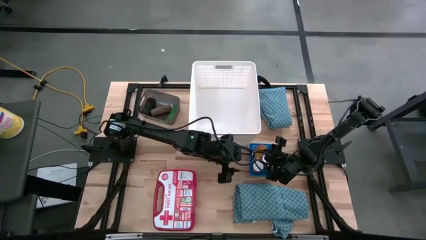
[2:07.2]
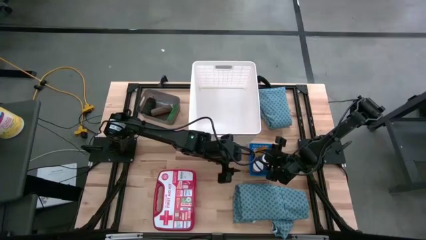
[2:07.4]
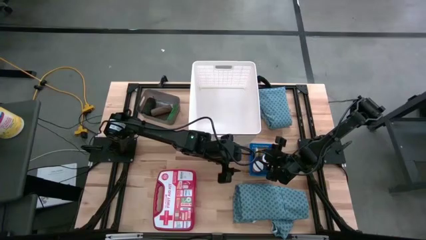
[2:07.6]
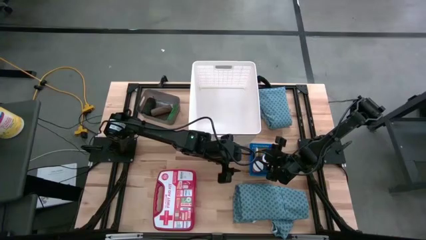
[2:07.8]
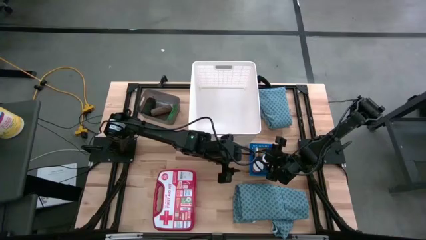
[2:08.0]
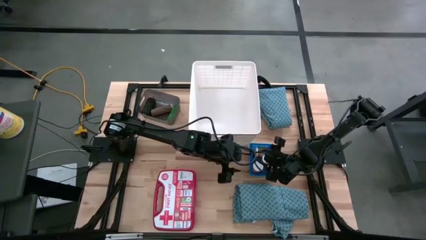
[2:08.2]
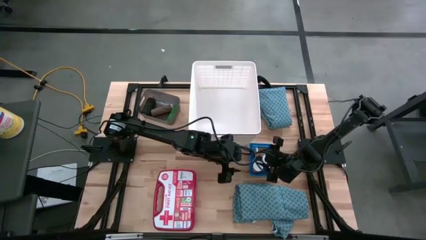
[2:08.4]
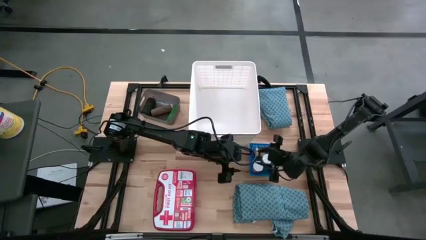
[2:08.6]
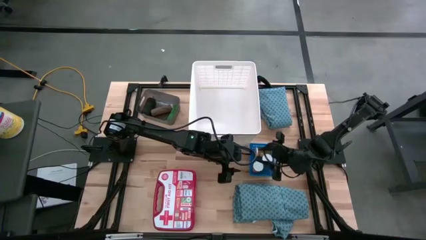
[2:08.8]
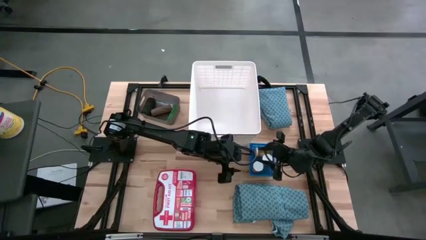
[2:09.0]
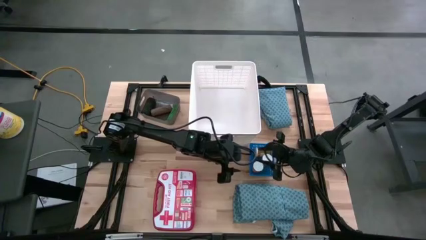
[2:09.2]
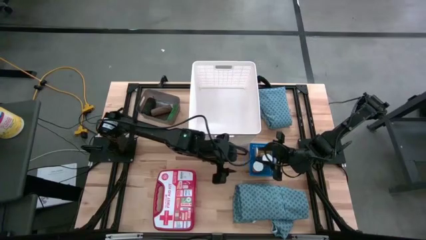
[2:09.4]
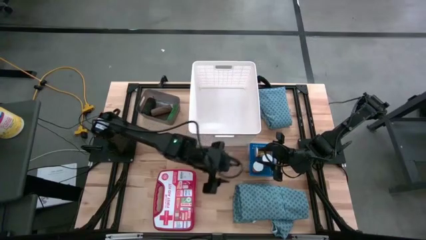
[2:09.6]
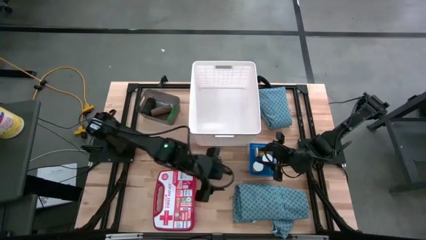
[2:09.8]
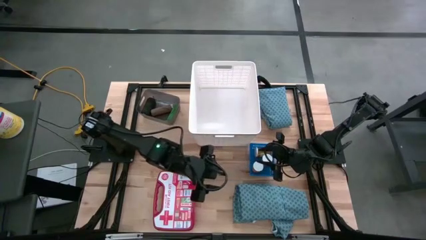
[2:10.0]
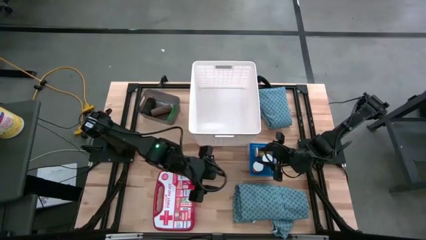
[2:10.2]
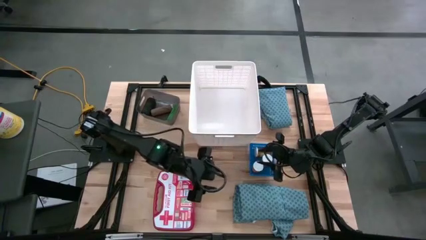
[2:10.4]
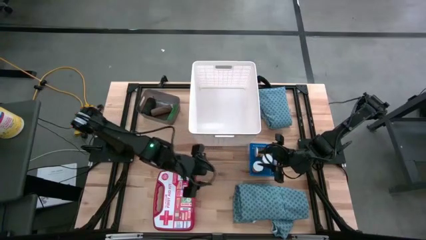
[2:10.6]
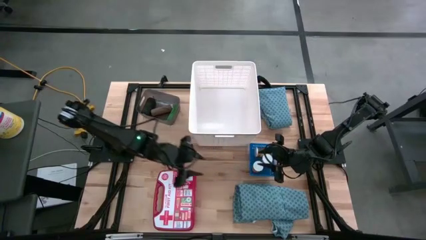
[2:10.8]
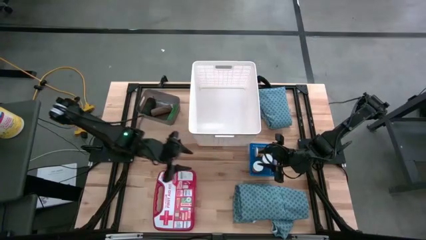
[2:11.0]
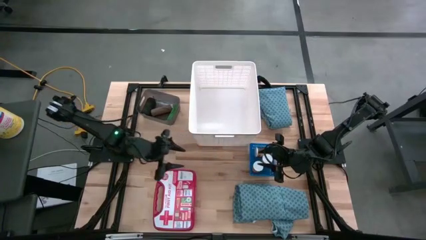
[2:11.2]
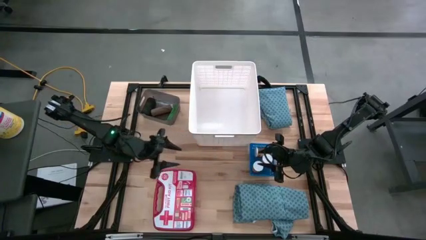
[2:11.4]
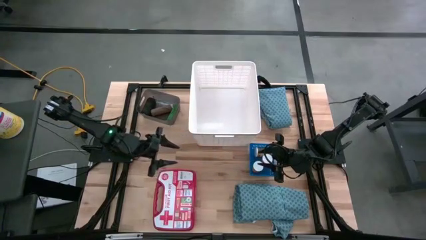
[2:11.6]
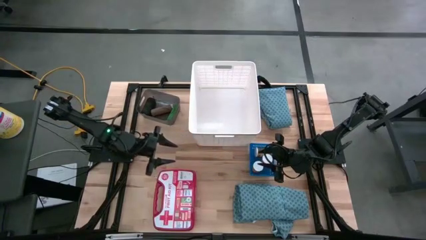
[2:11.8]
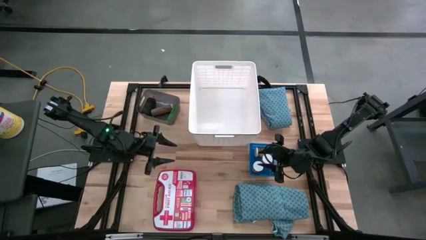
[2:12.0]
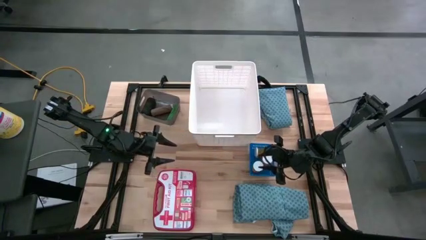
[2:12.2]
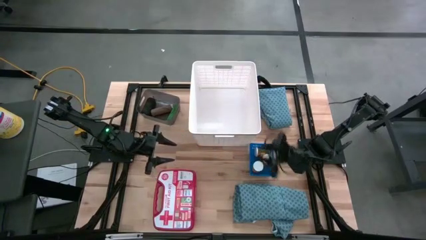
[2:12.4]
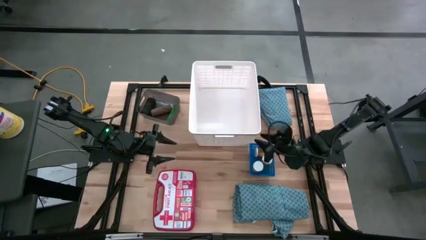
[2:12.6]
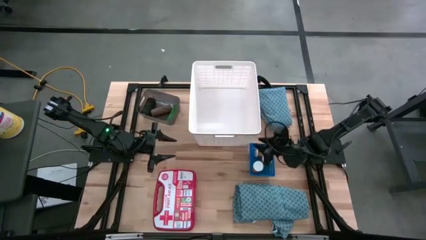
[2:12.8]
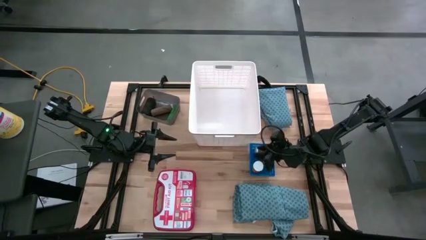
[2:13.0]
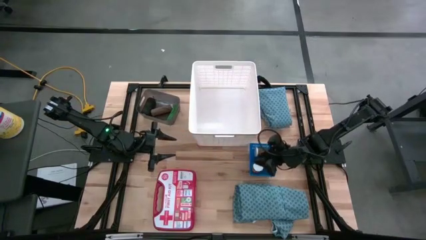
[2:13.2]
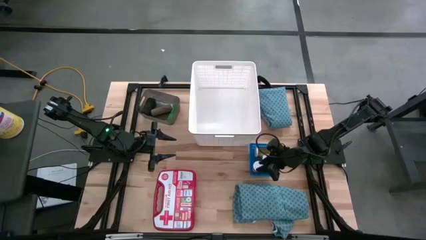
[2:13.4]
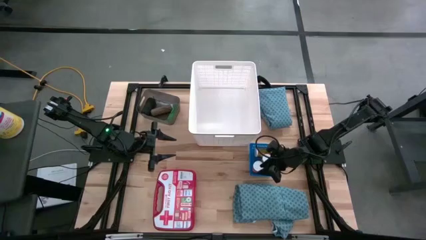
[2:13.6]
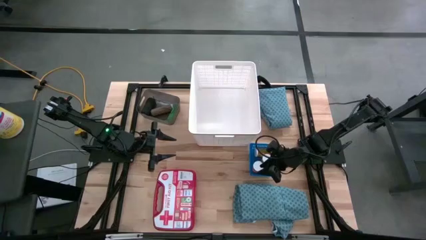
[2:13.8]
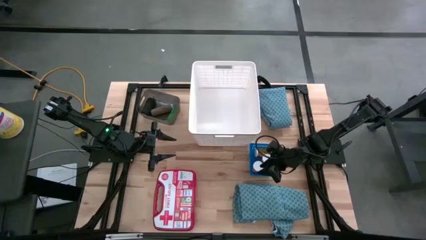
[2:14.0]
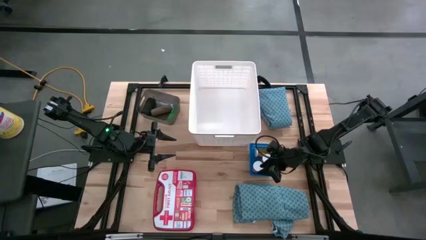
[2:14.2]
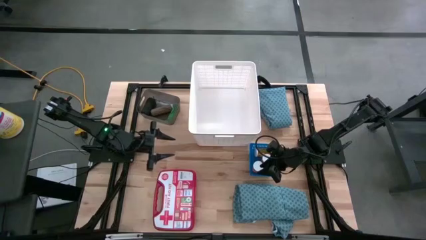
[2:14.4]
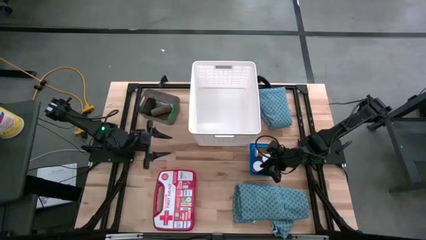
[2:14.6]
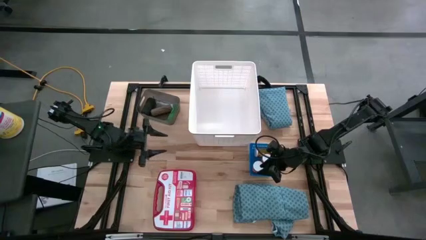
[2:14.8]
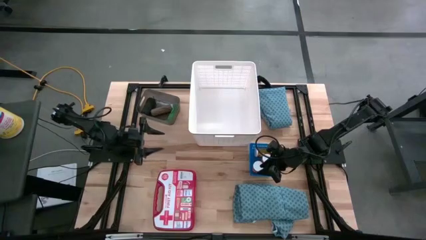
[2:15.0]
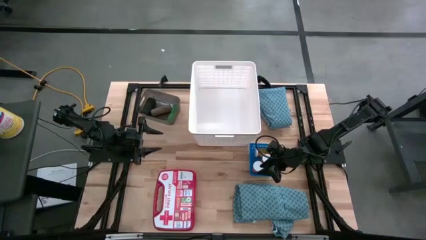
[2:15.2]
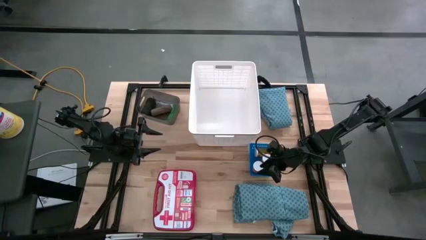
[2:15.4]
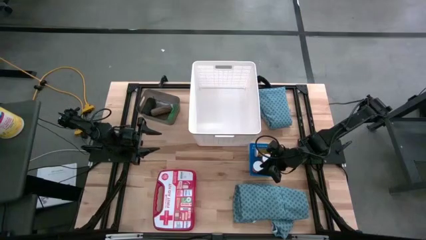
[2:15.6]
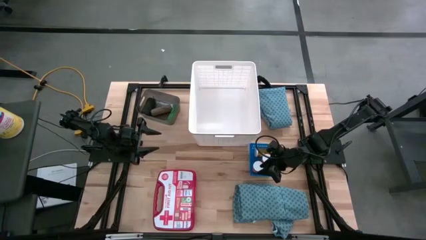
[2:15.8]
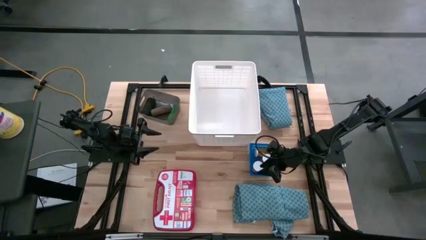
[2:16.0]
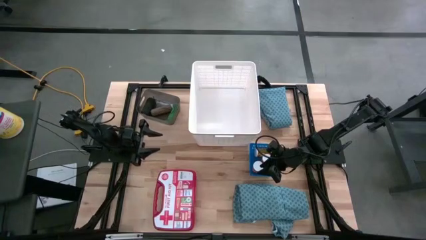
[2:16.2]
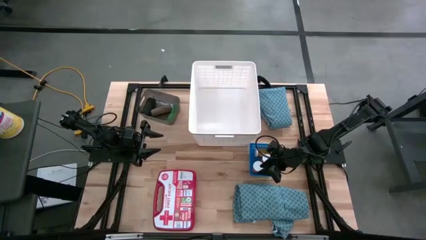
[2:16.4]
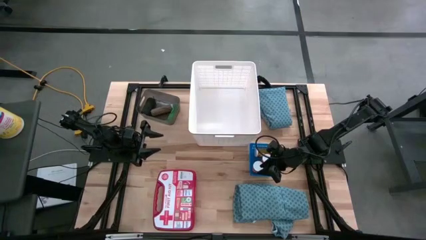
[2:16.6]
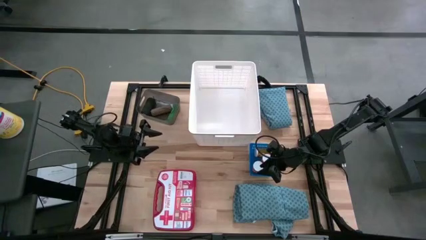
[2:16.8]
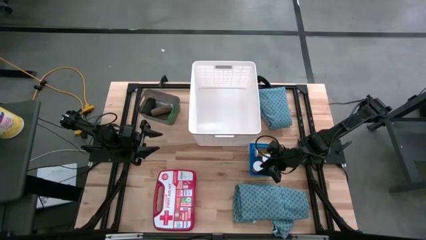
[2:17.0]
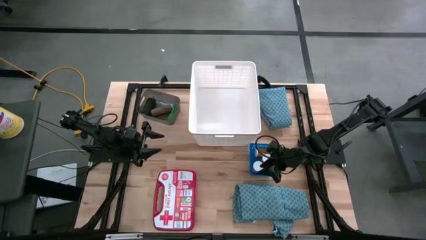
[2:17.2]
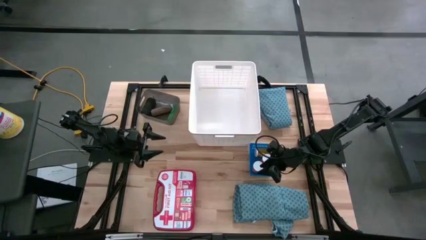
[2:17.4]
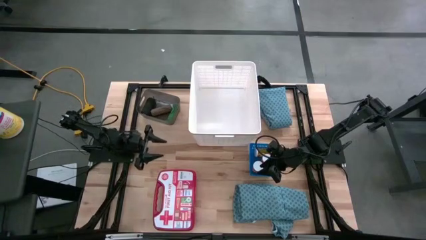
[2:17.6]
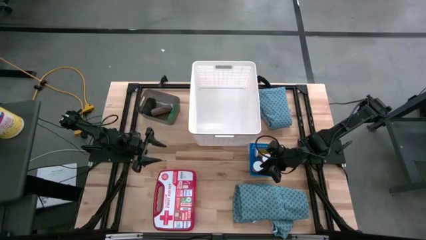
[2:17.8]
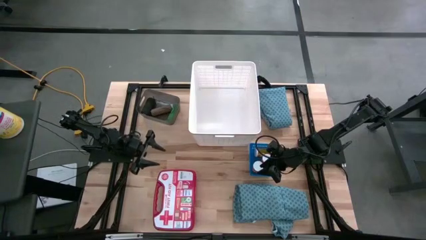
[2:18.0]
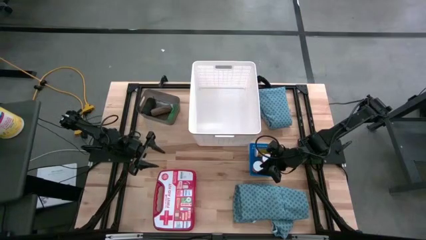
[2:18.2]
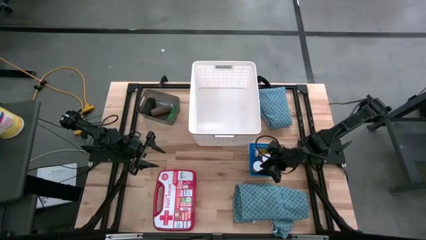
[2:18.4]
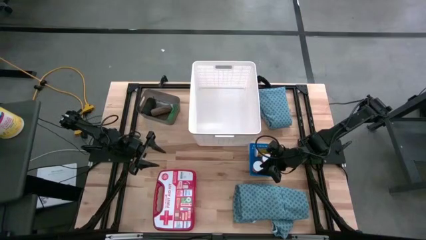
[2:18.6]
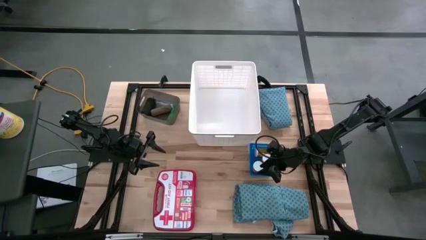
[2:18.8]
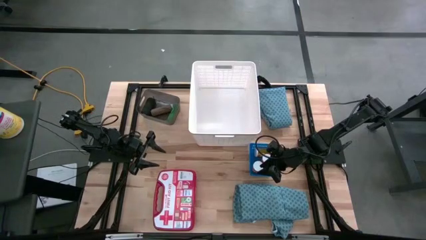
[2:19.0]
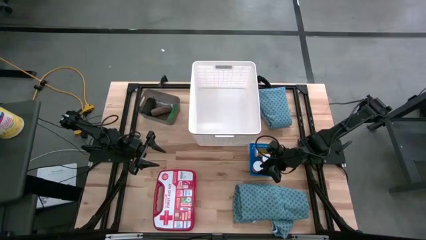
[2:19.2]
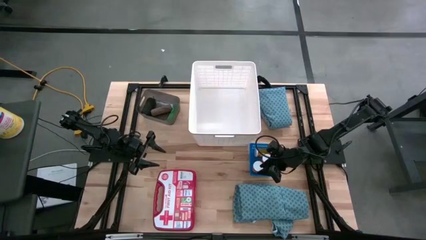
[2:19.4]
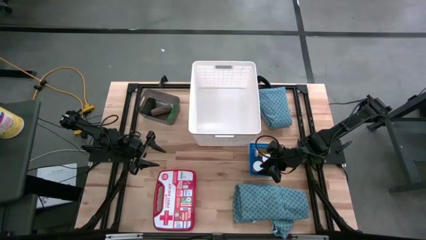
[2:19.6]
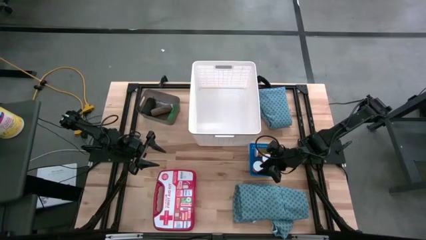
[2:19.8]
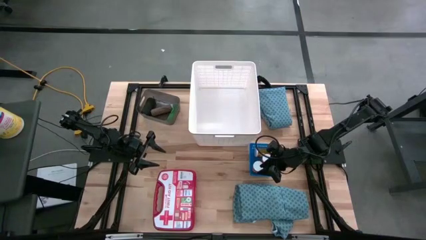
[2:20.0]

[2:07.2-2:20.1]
Task: Pick & place medical supplies in basket/bin
Put the bottom patient gown into the white bin

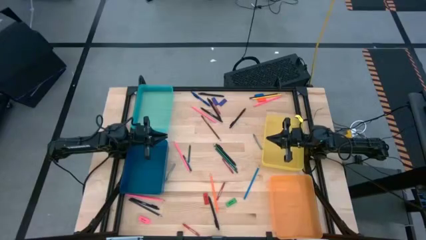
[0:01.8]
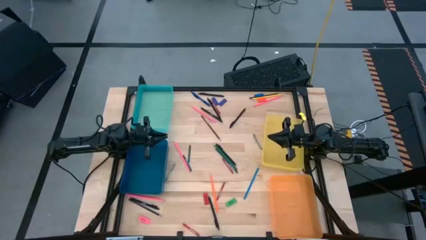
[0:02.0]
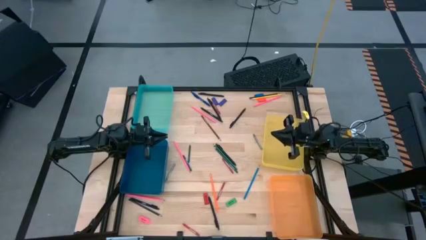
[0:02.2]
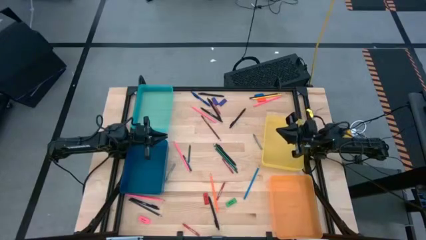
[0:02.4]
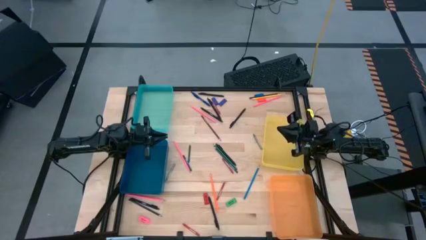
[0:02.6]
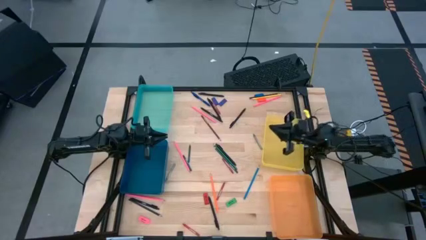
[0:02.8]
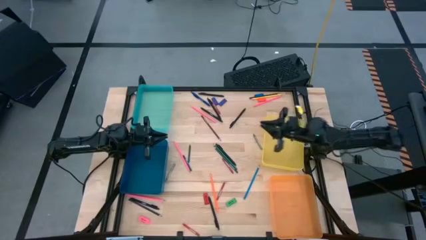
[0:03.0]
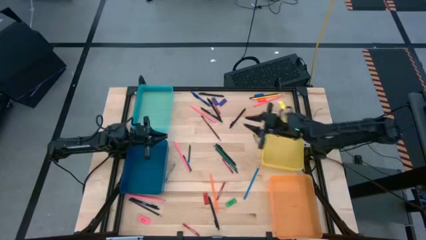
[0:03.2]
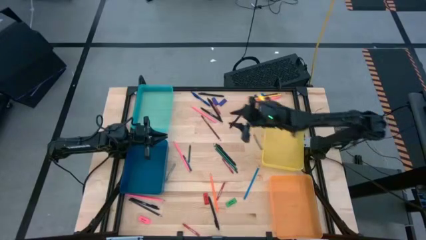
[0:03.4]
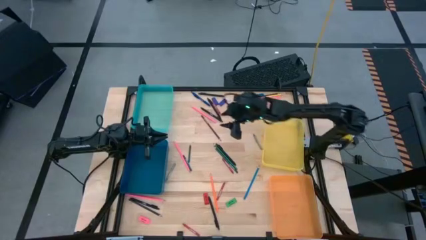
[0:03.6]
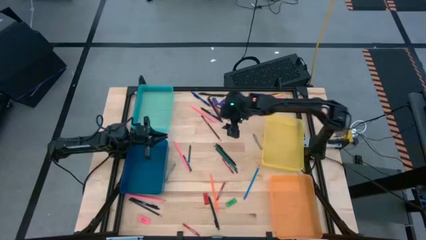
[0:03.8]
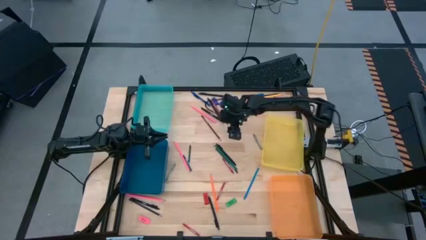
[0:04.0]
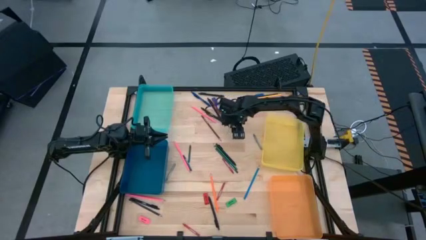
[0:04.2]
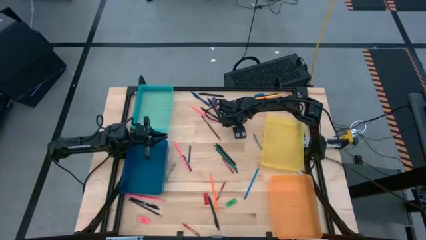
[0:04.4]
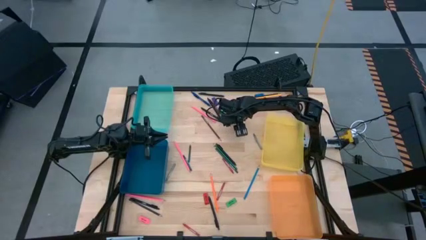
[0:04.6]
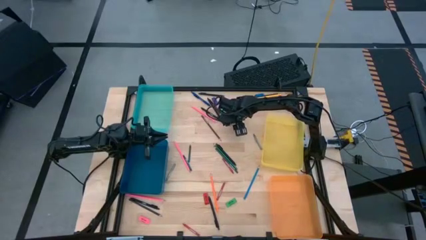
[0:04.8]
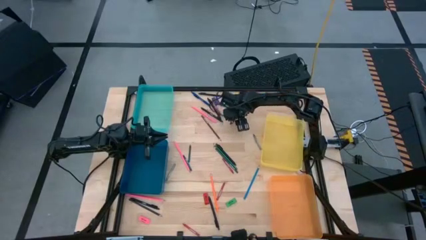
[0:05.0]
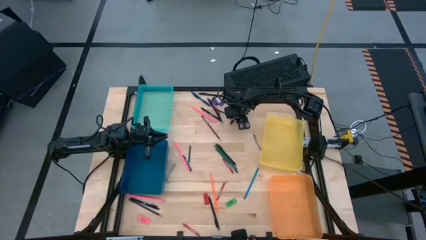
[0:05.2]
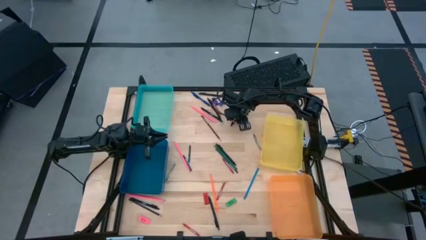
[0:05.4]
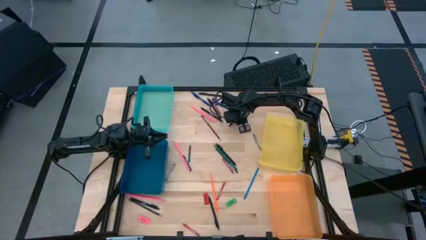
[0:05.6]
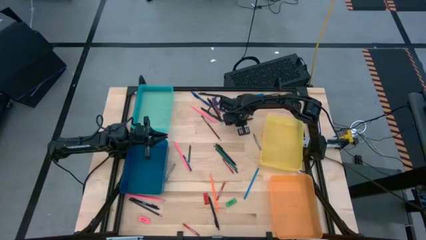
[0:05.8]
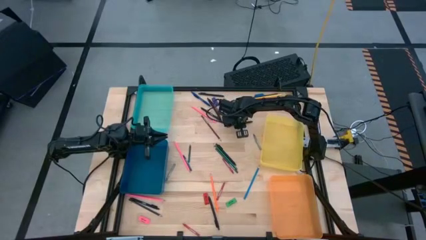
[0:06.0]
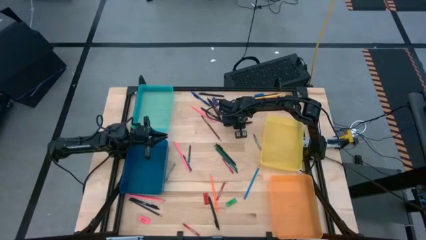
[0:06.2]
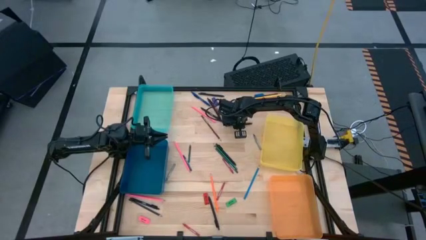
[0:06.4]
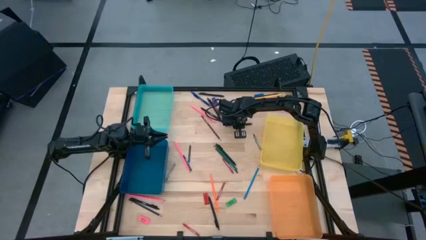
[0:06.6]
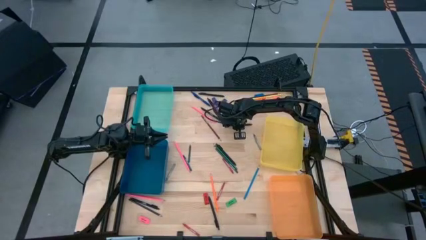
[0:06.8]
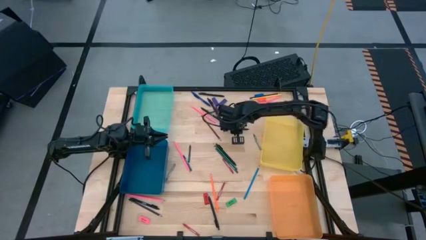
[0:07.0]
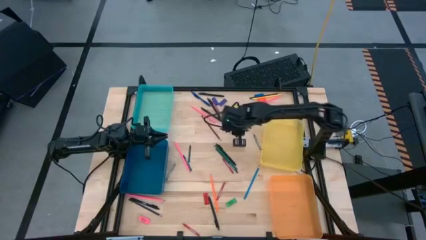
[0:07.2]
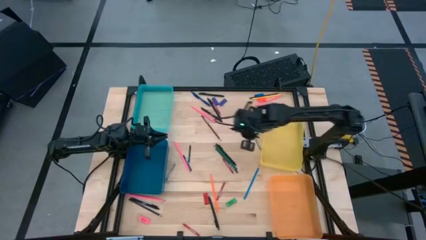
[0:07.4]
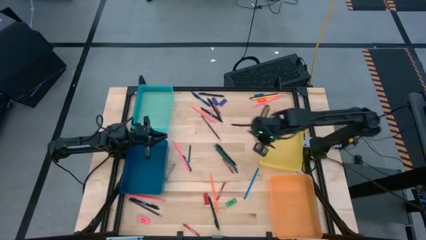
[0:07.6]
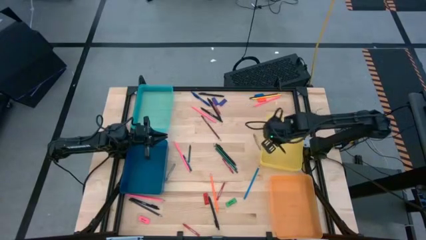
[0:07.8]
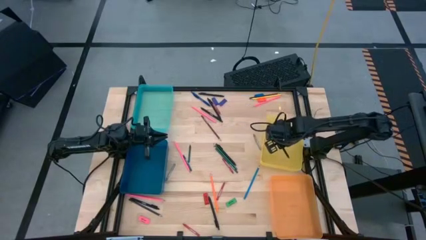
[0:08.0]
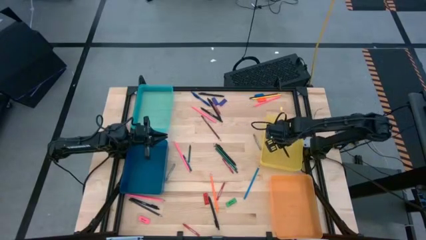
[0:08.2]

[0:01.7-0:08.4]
Task: Sort crayons/erasers/pens/pencils in bins
Put the black pen into the yellow bin
